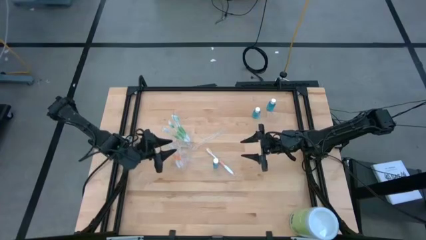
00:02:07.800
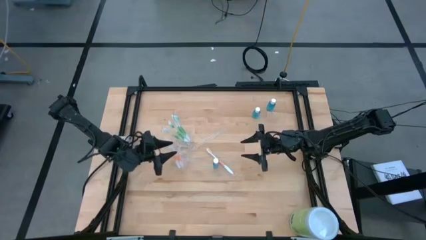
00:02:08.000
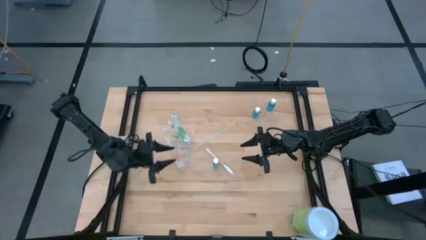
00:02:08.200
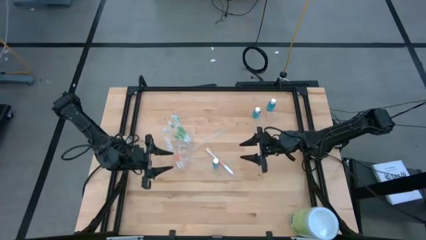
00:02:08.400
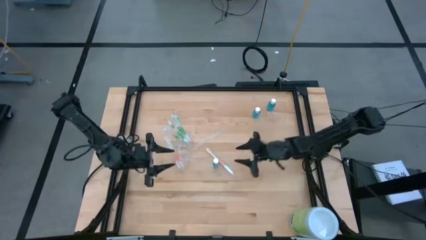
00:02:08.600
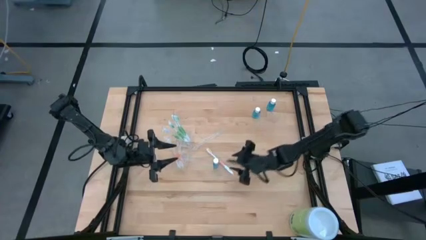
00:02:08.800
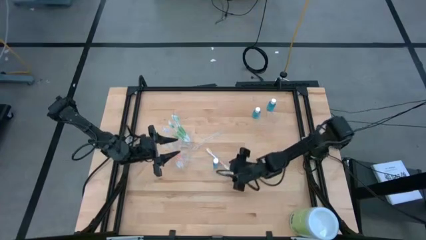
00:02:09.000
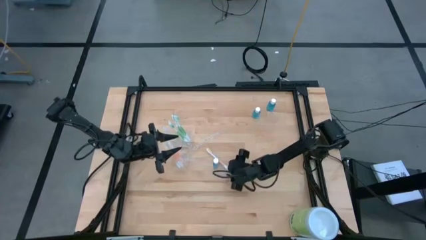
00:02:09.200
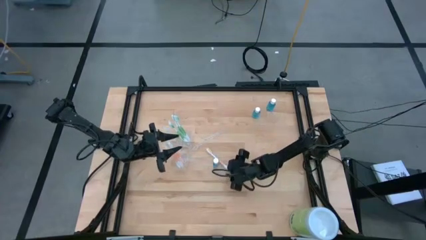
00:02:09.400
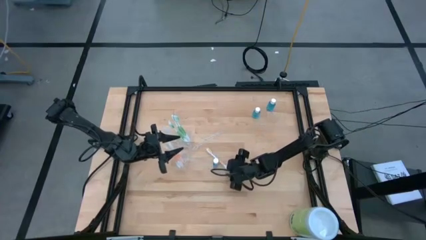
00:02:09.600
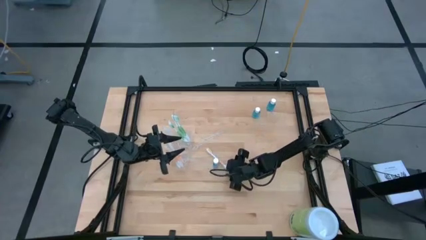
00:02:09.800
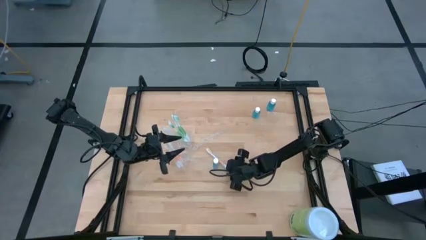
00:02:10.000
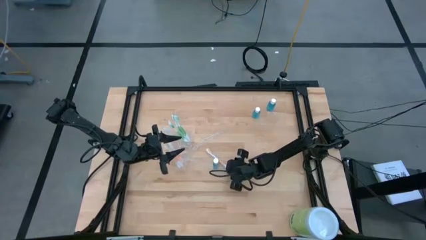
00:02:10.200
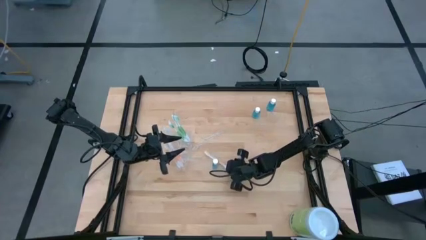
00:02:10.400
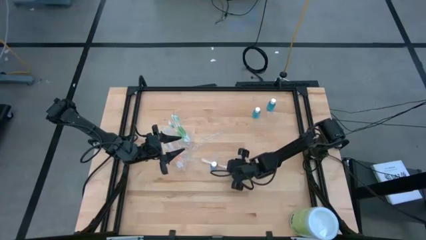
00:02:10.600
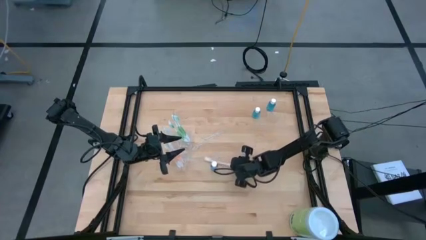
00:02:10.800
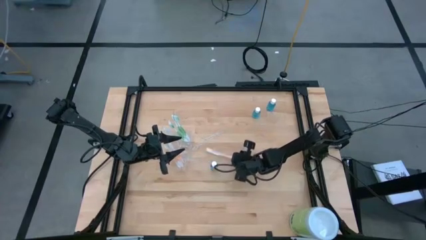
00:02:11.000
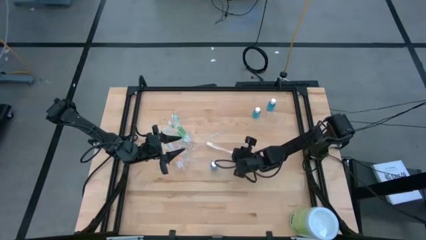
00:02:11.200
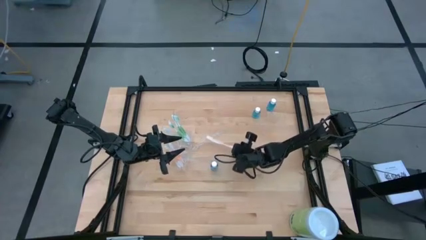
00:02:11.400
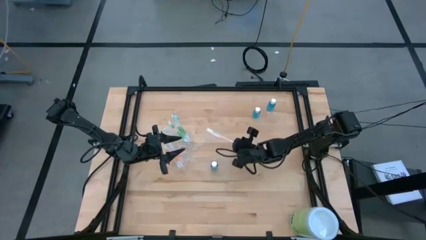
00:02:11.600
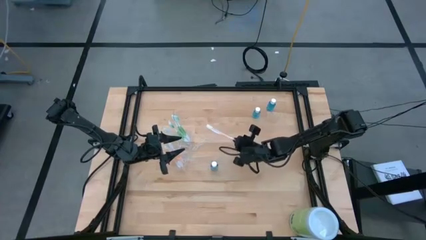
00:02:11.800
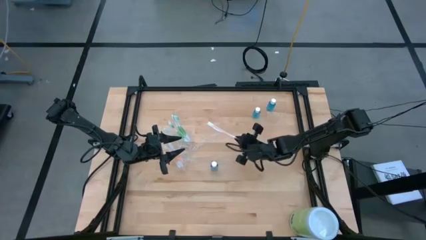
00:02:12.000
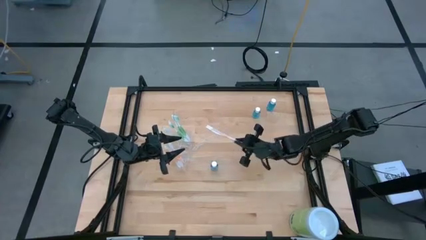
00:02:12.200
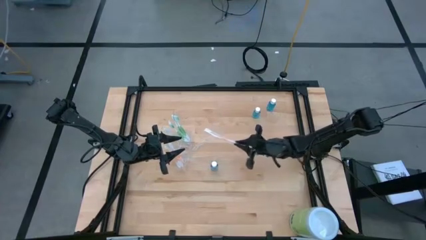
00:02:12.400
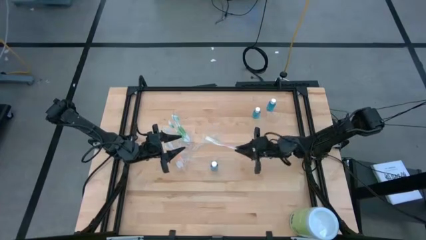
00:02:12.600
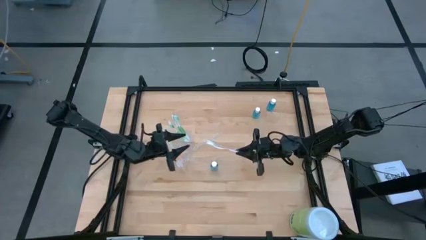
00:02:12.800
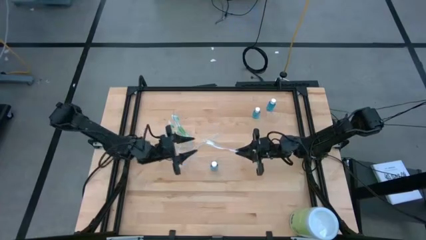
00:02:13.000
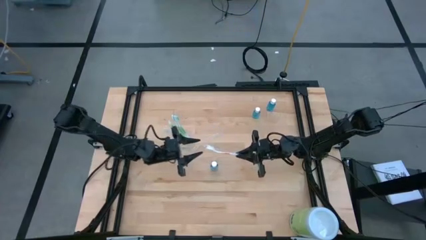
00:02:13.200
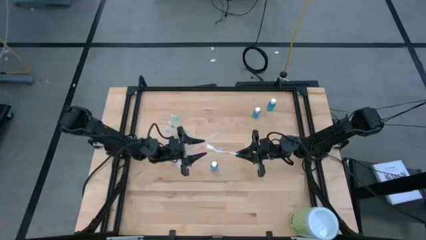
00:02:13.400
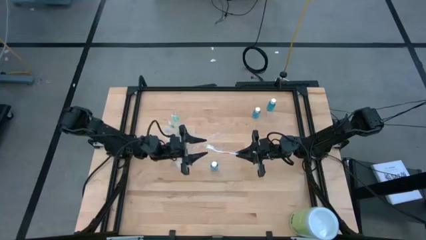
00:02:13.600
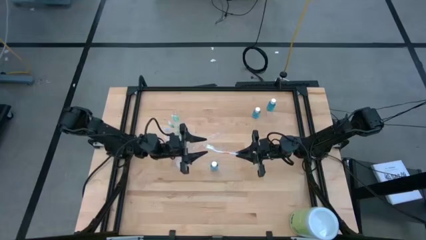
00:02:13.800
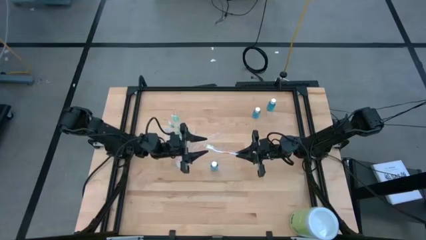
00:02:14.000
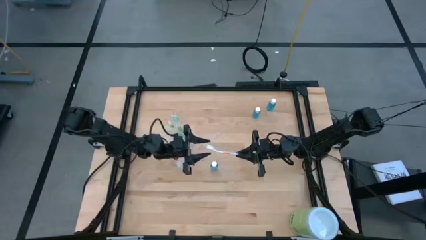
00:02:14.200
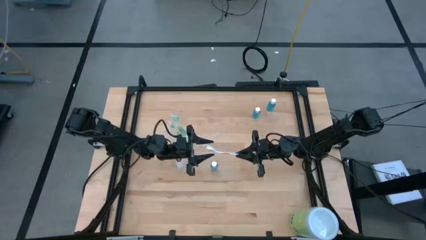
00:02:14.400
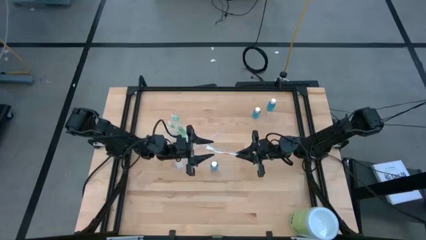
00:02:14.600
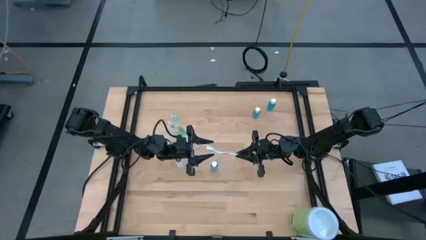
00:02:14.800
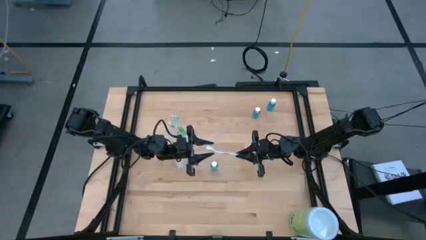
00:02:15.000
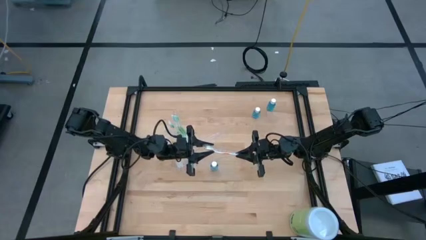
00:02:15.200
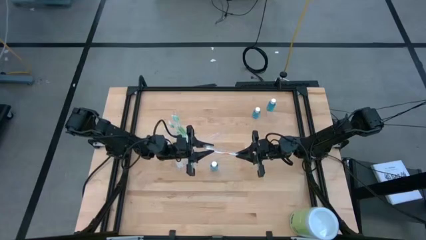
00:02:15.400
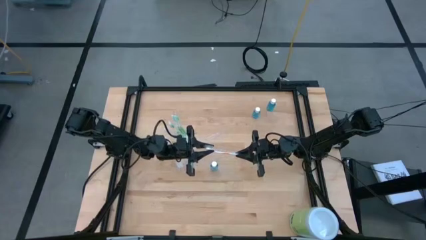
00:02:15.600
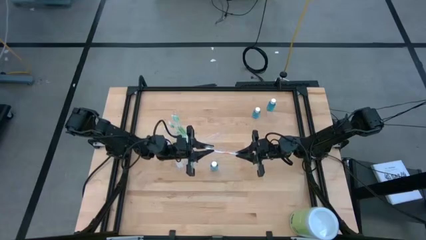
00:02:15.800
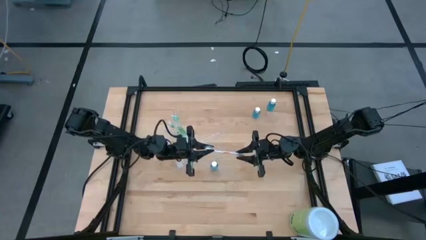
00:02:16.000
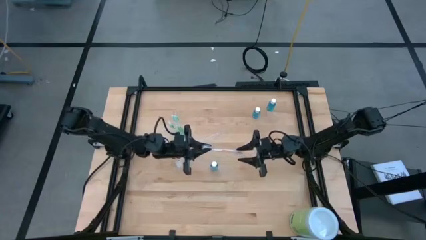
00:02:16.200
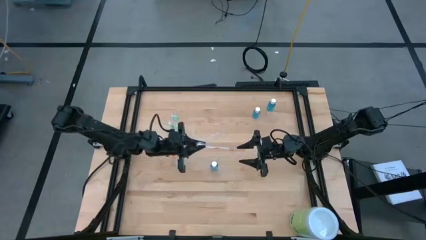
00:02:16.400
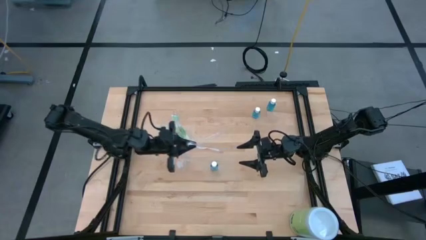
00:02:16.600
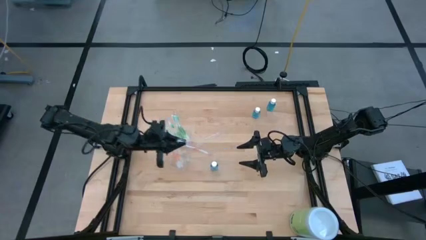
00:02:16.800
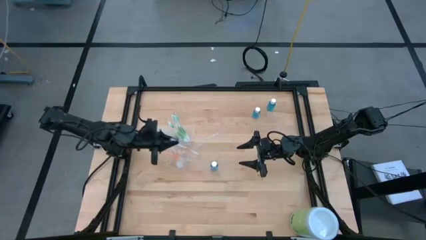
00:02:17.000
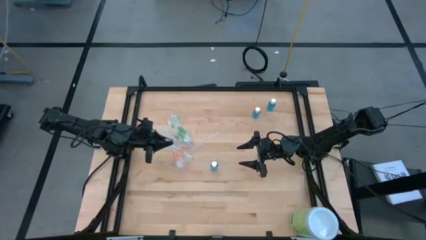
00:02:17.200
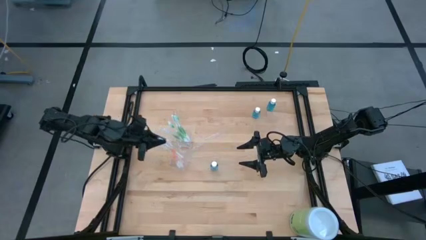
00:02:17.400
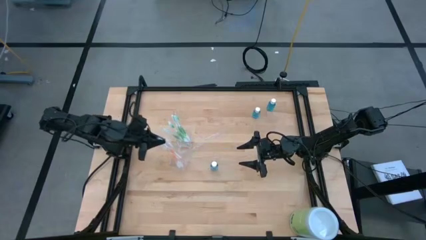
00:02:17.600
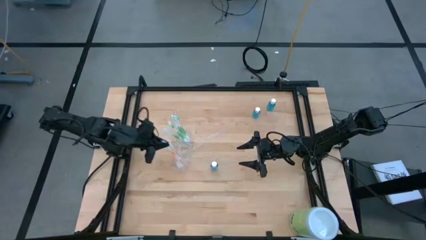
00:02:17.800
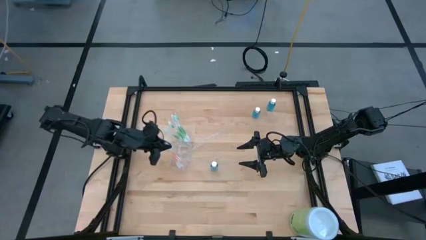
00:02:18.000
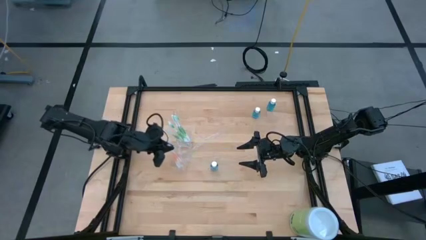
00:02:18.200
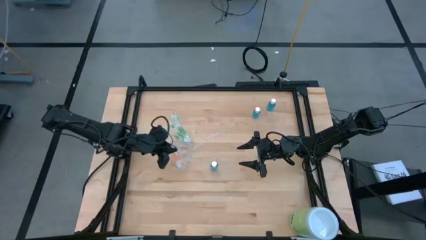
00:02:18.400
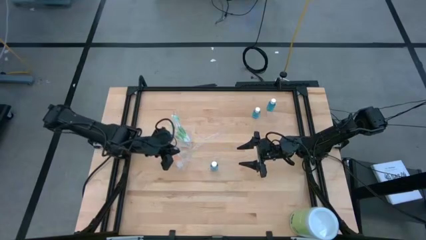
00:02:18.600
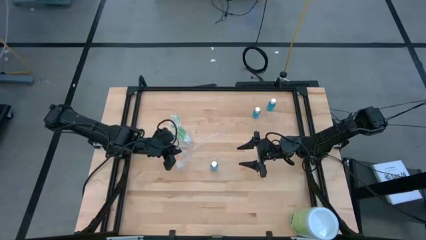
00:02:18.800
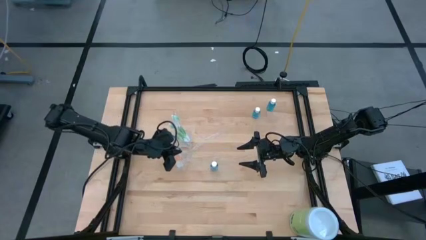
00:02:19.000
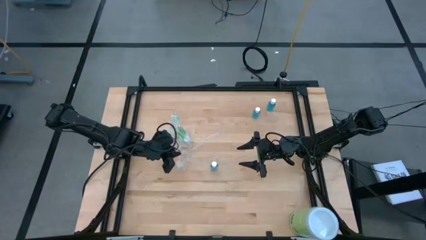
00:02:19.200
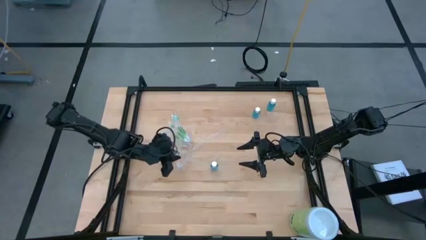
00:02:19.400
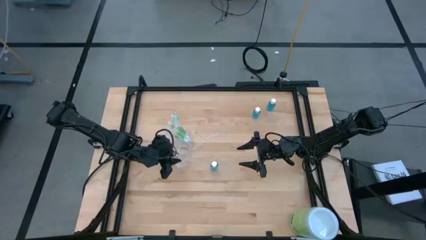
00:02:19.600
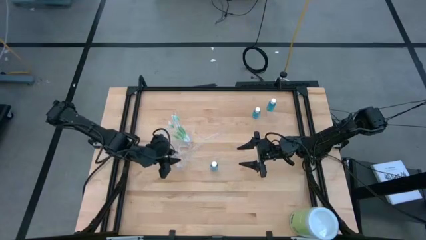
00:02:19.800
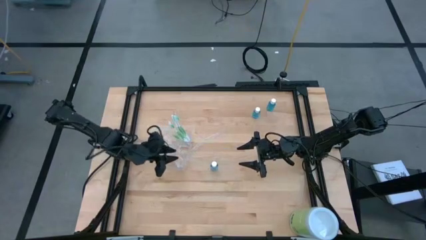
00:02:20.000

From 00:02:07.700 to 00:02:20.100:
Task: Pick & Place toothbrushing station
Put the orange toothbrush into the bottom section of the transparent organizer

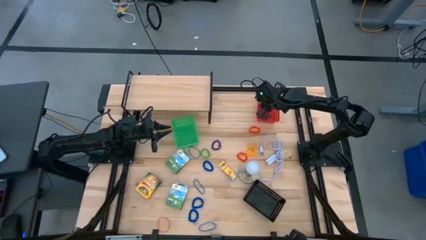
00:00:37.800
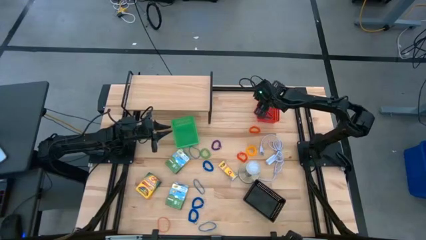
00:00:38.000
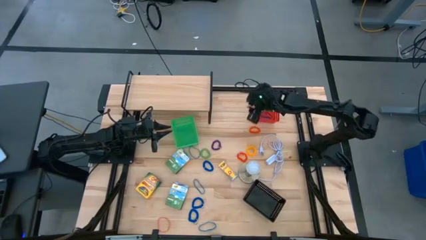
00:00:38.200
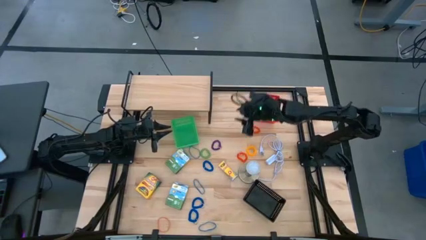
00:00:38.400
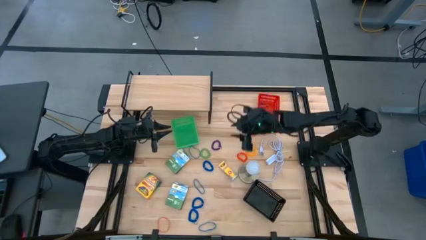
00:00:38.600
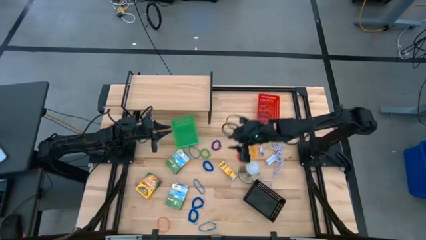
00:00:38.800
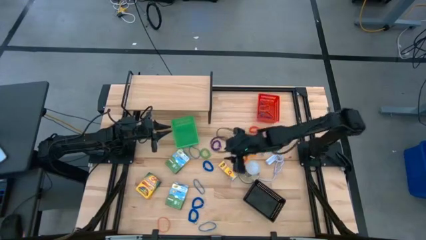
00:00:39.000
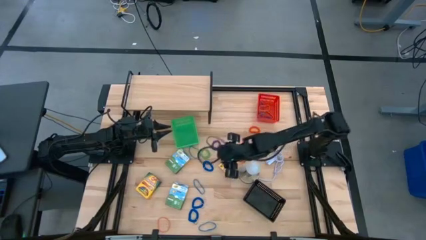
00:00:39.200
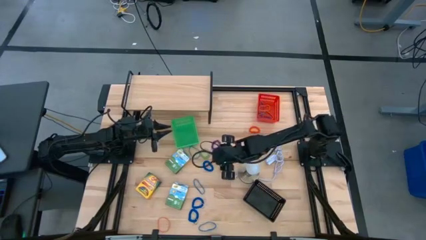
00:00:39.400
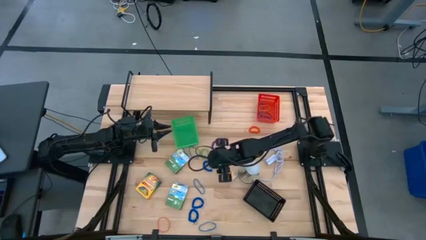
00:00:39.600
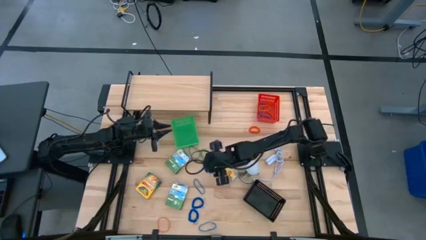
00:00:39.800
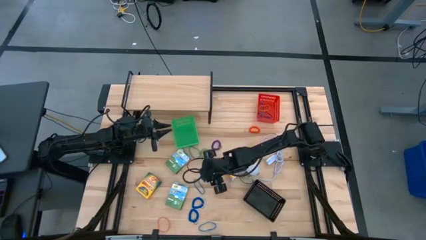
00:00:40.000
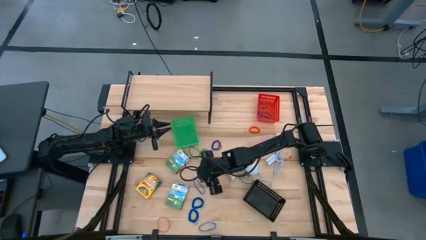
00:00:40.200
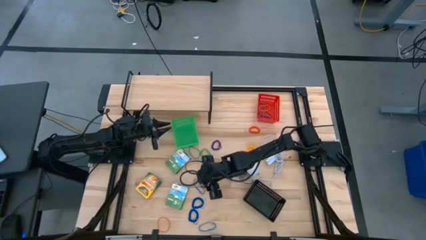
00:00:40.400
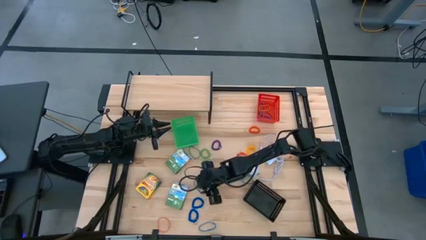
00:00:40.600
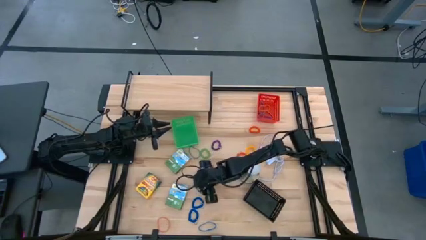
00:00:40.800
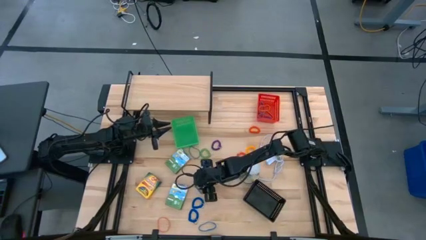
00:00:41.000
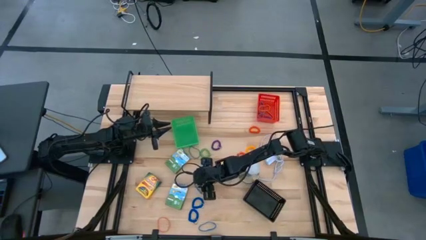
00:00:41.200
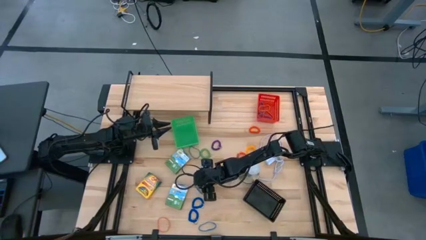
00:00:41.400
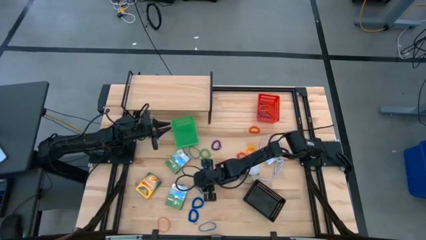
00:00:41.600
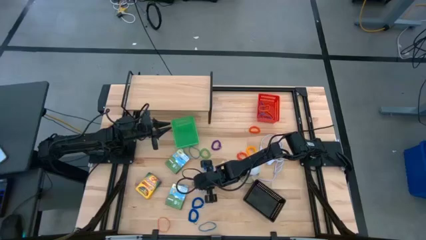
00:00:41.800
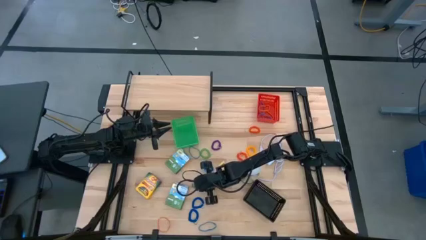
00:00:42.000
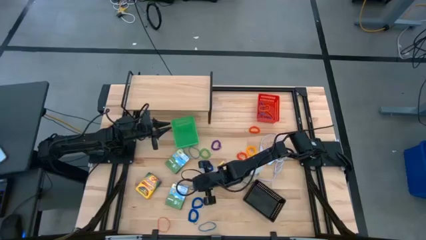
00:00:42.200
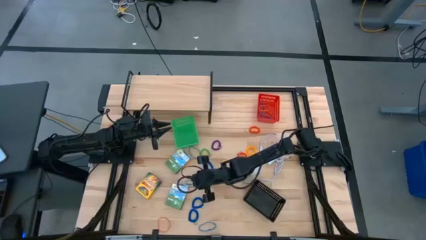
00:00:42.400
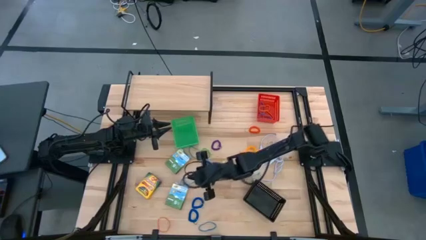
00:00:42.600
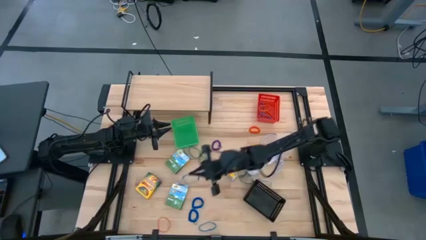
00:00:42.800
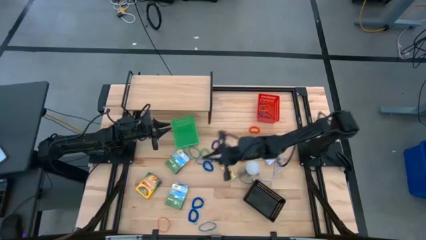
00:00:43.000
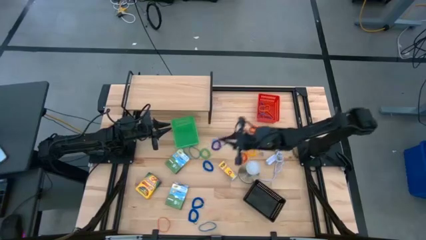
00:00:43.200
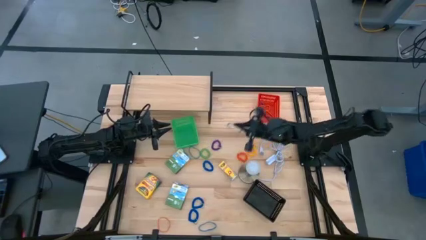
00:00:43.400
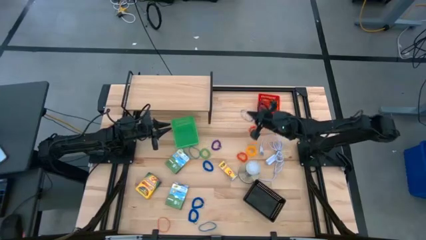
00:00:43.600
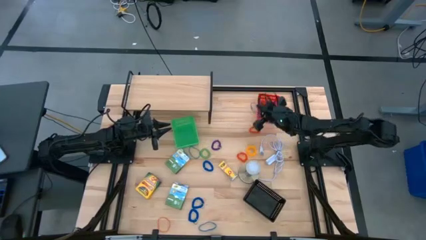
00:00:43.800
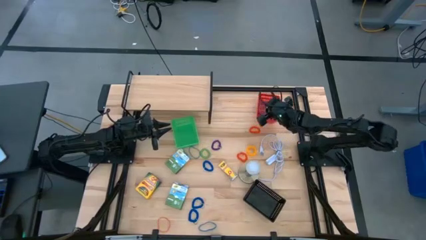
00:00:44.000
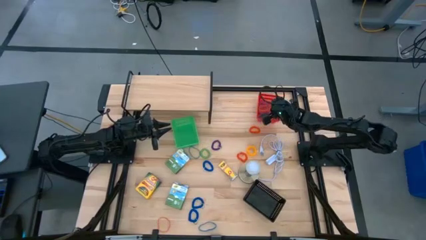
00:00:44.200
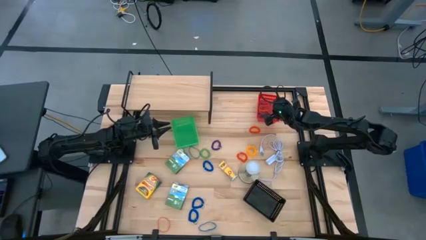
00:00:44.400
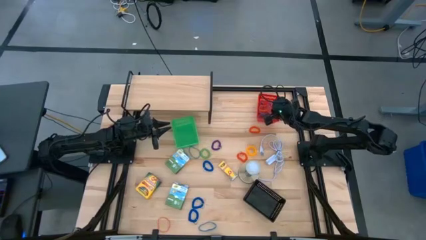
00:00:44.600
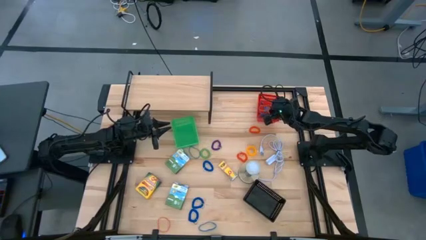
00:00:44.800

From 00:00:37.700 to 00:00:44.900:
Task: Pick & Place Office Desk Supplies
Put the blue rubber band into the red basket
